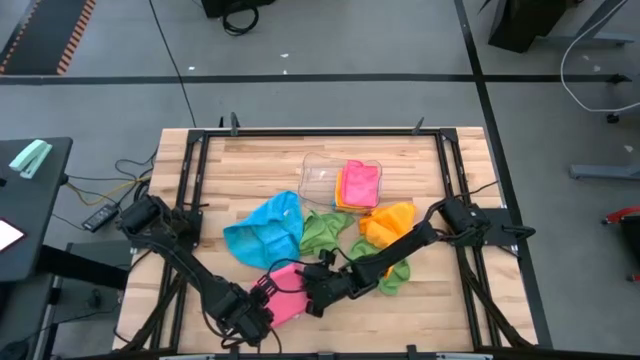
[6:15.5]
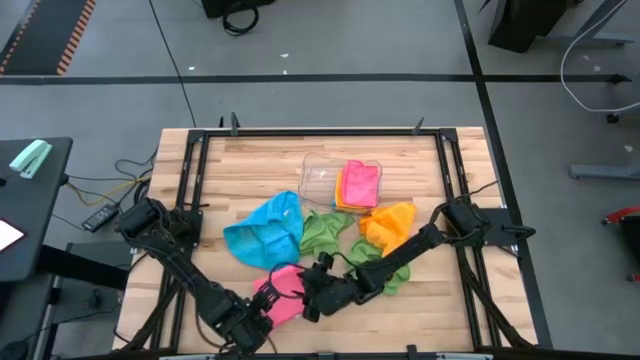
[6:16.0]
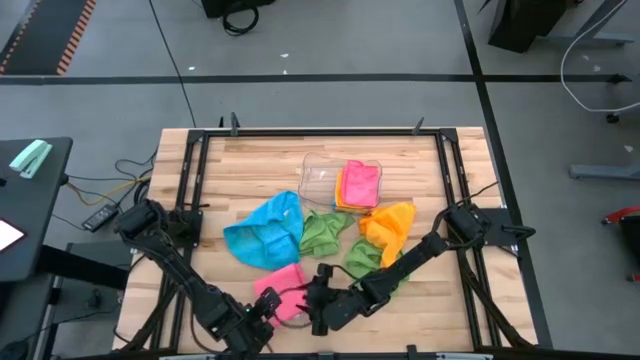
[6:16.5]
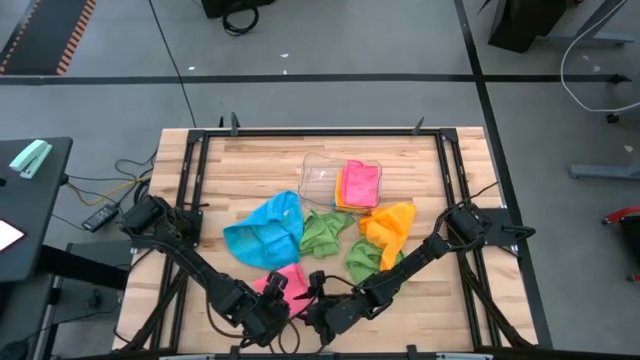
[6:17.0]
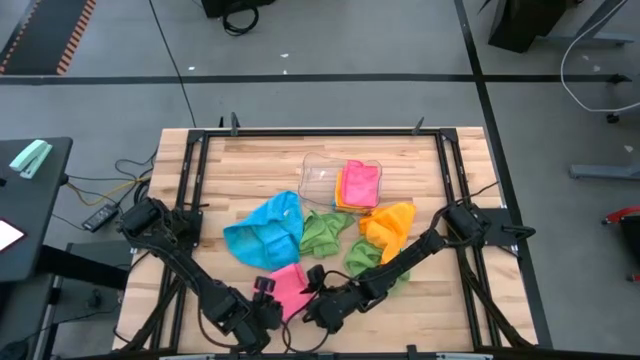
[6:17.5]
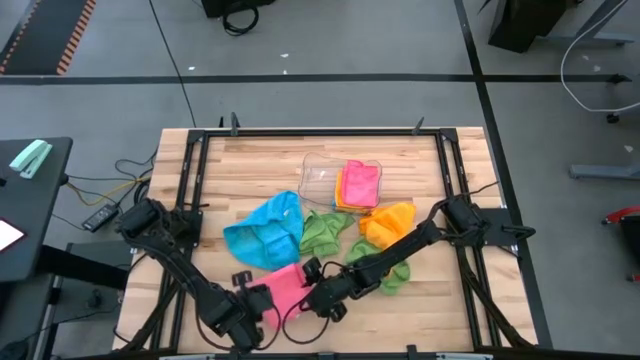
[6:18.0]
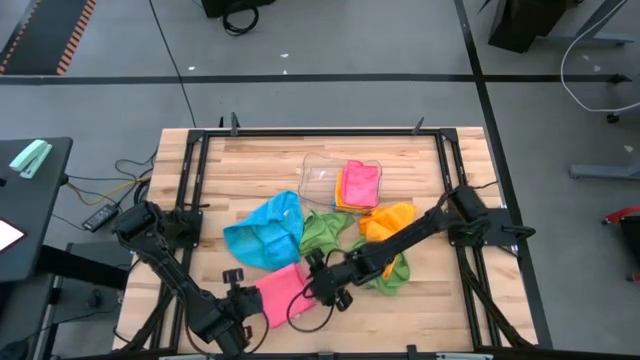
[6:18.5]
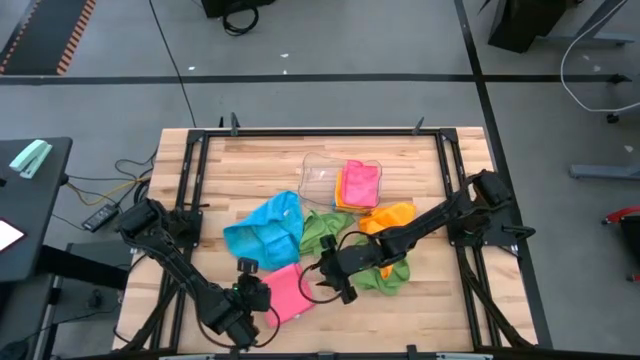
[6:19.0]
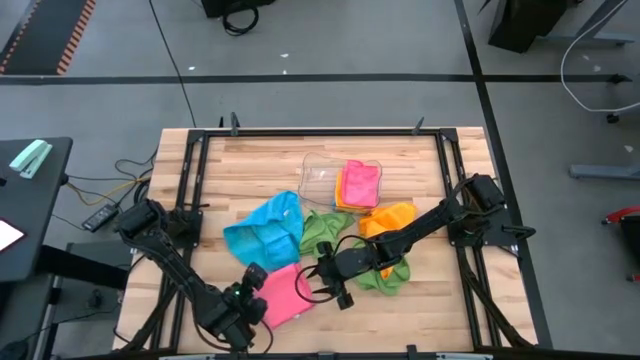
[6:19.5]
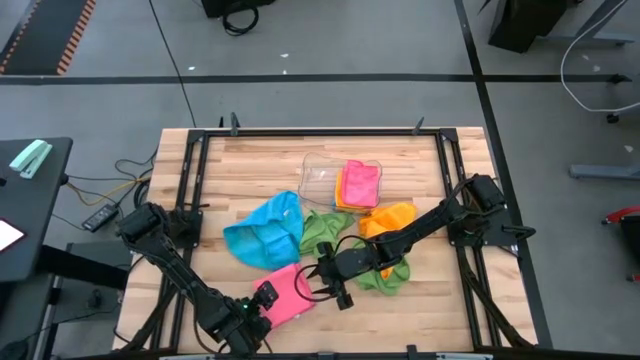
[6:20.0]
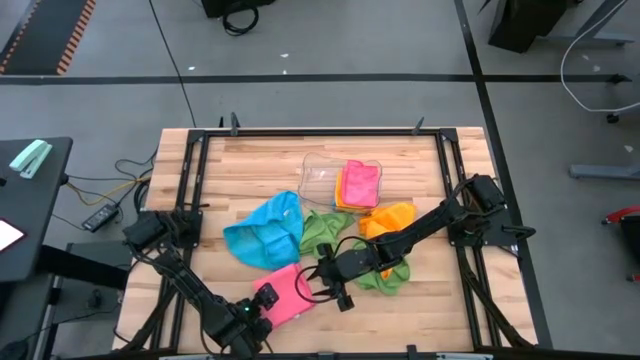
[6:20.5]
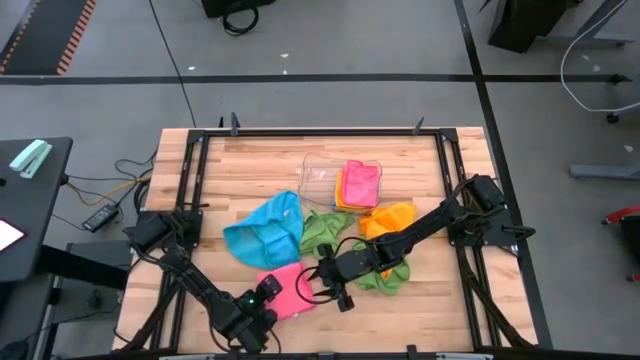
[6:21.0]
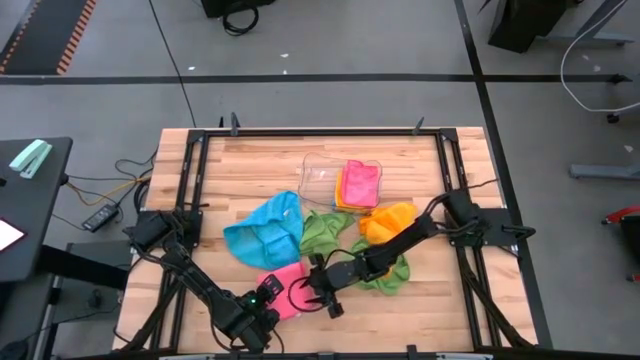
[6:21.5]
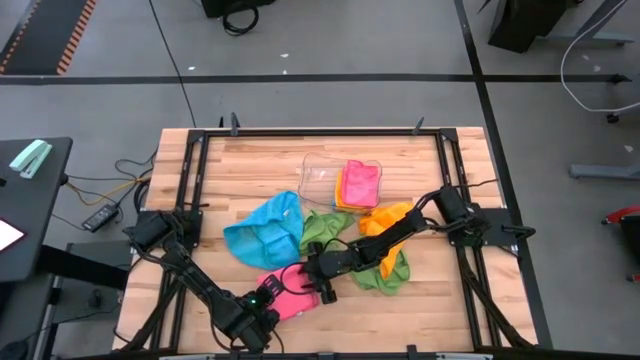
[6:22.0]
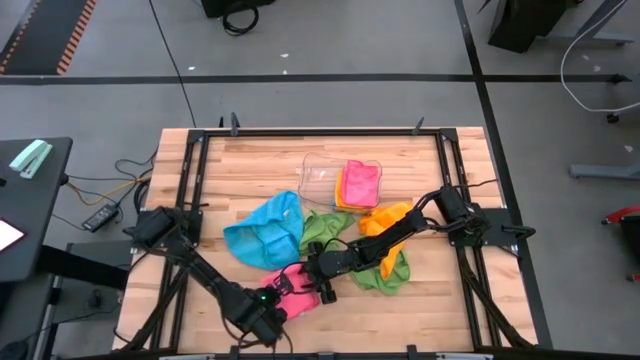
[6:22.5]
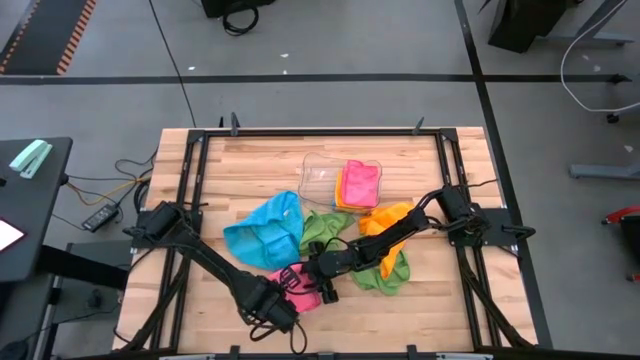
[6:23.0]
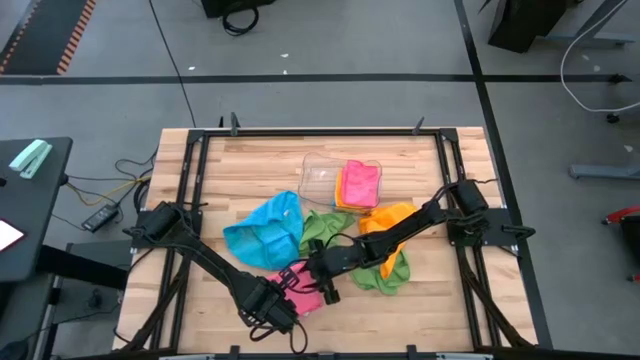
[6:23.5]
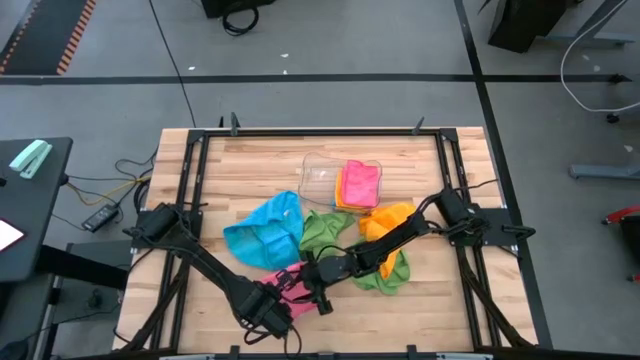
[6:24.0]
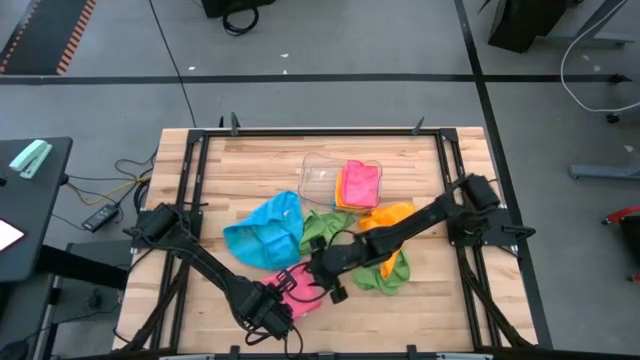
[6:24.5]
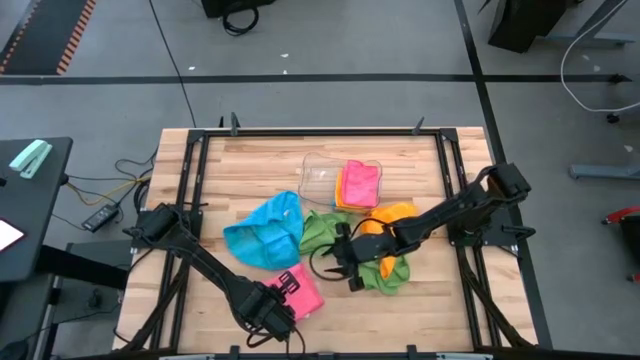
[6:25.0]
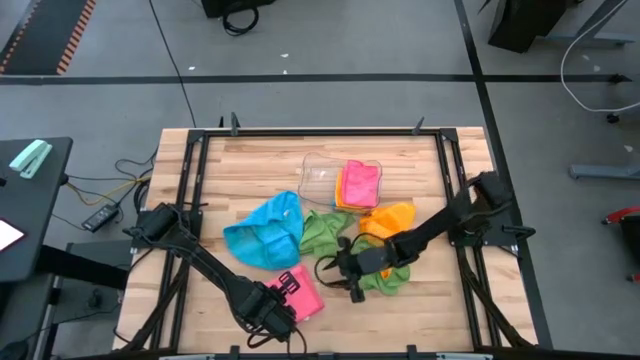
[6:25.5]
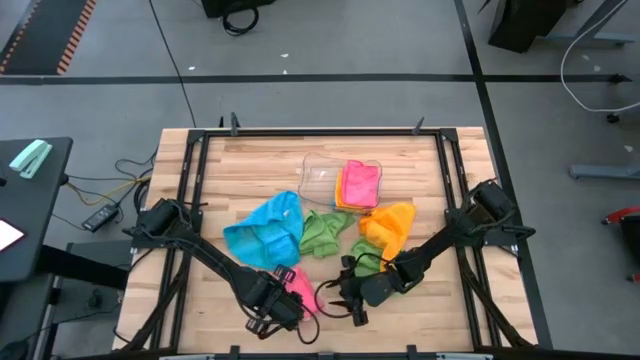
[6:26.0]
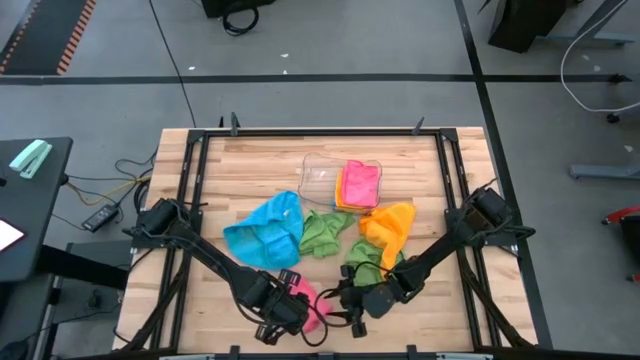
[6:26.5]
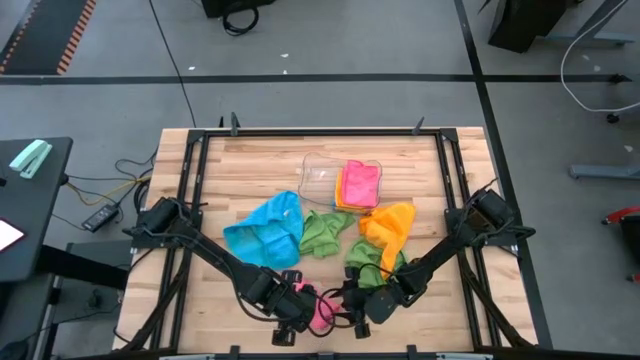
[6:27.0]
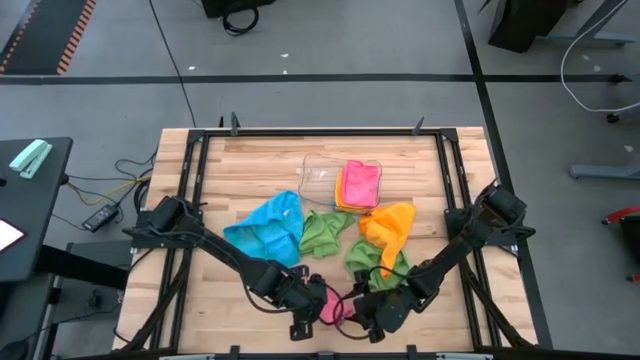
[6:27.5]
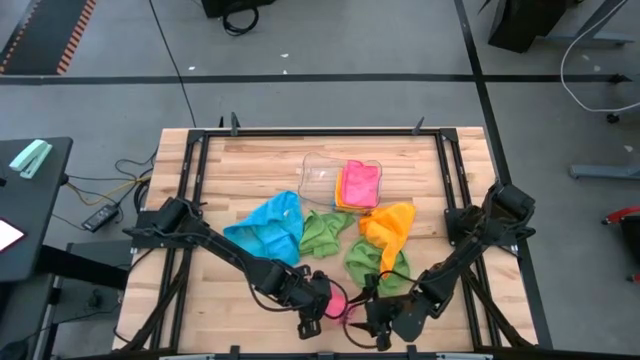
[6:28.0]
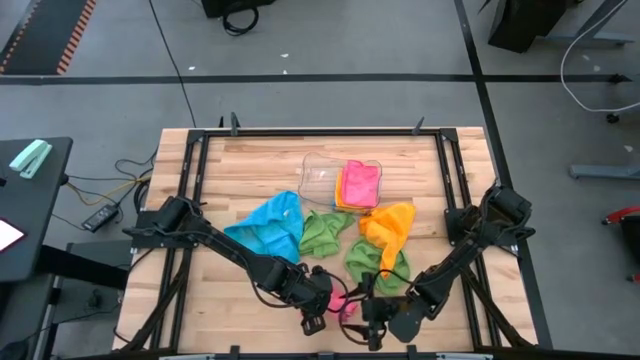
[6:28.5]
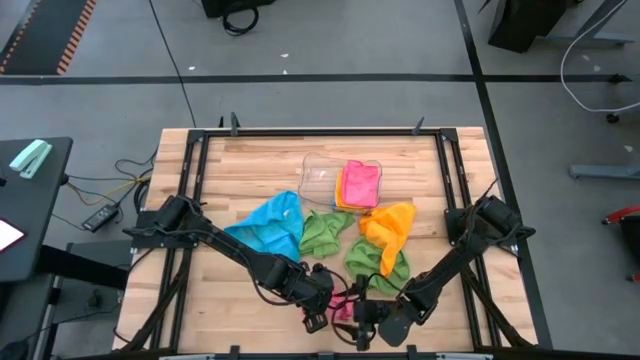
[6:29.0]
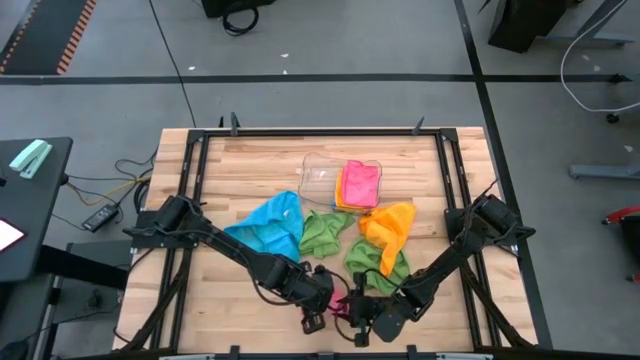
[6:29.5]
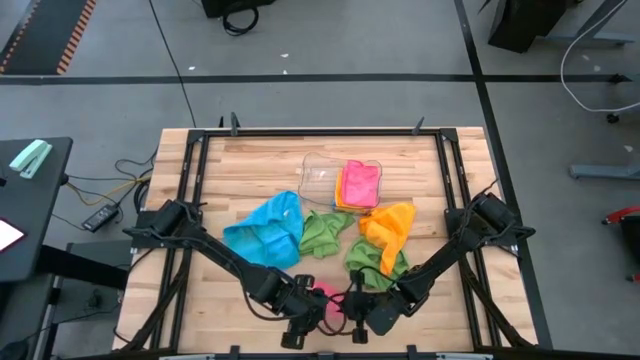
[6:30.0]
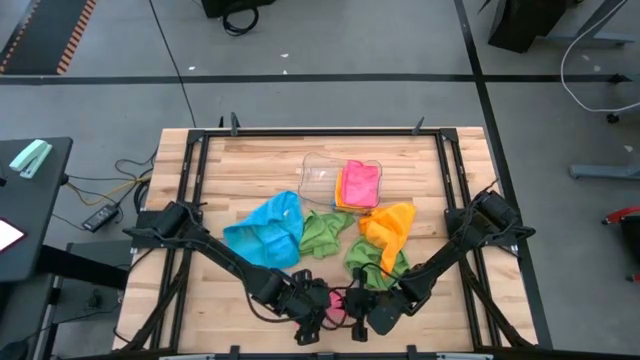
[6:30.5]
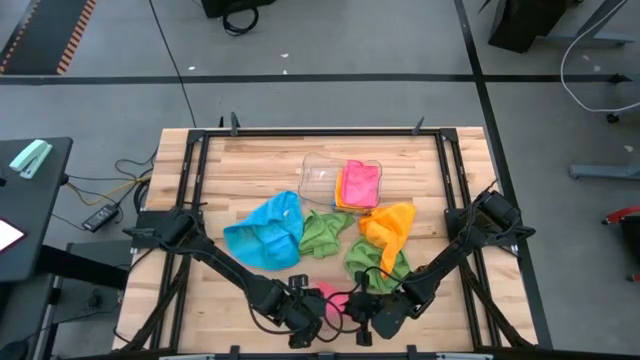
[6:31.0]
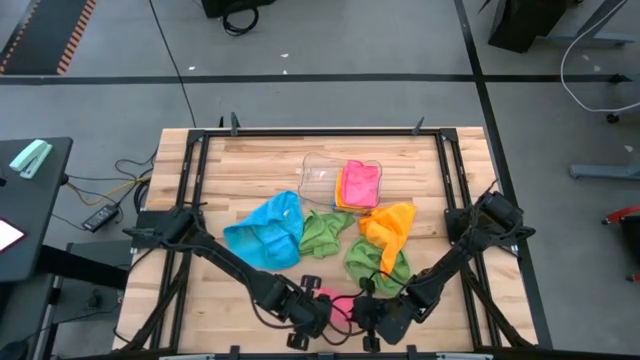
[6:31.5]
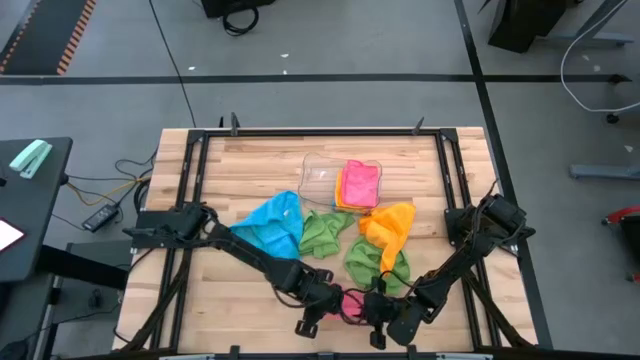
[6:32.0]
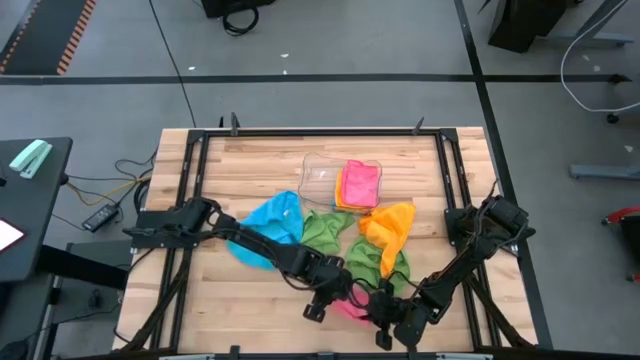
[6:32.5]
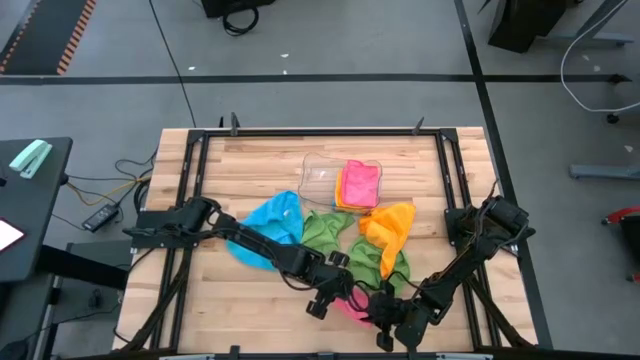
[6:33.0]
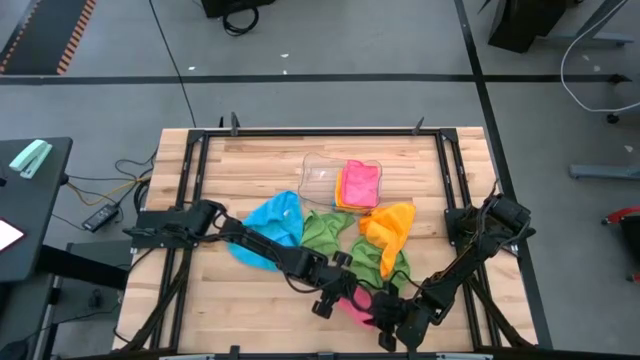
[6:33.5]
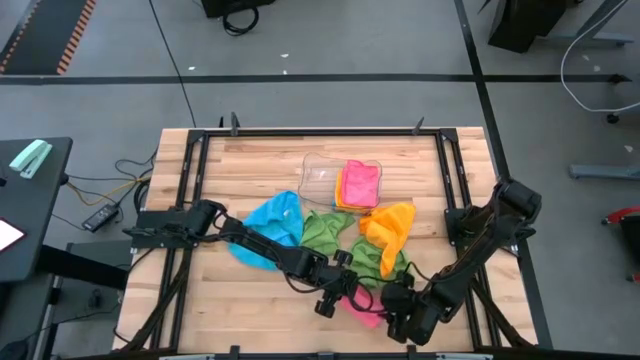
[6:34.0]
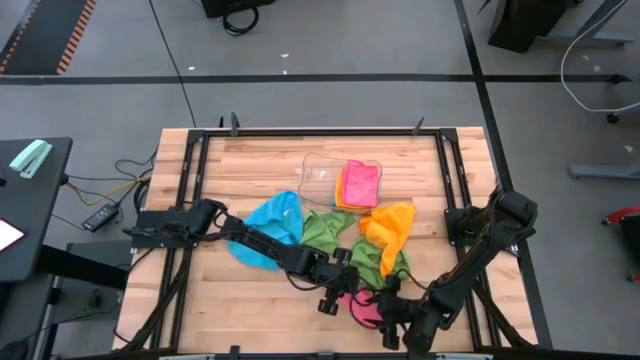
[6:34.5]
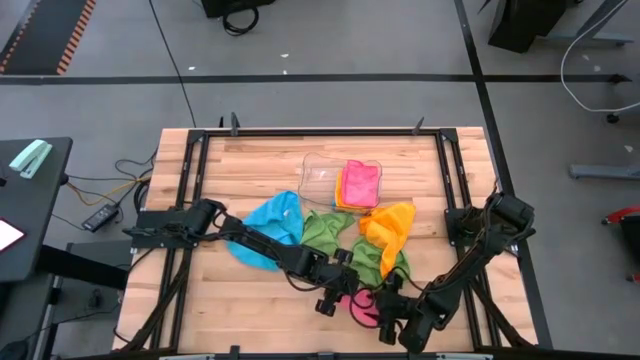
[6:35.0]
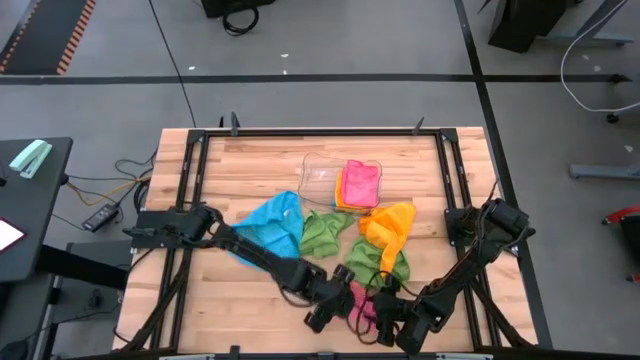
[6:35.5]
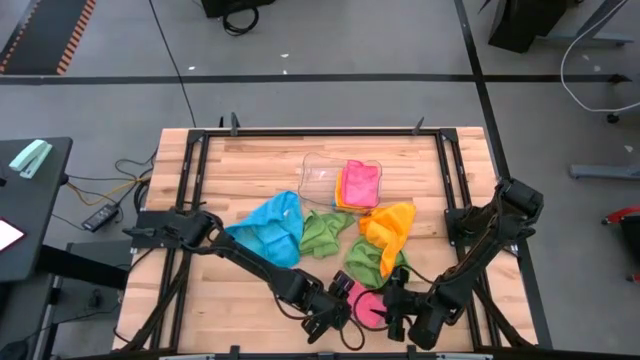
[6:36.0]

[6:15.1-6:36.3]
Task: Fold microfiber towels
Fold the pink microfiber cloth
